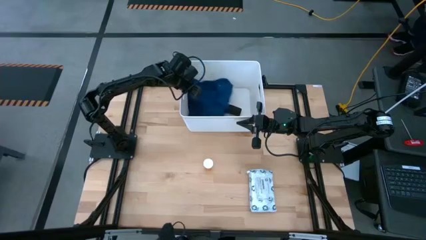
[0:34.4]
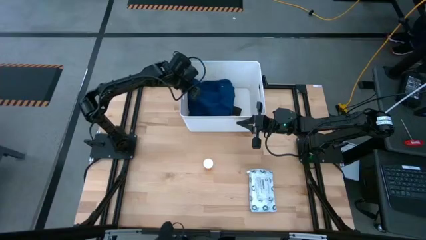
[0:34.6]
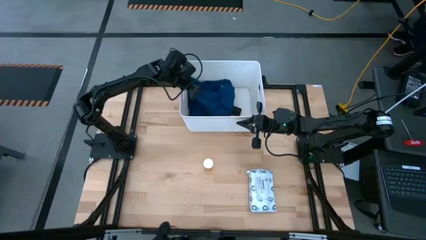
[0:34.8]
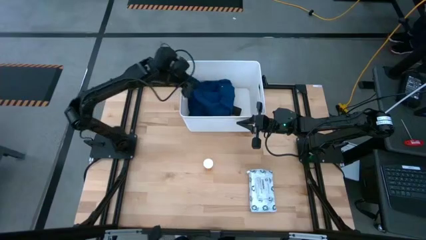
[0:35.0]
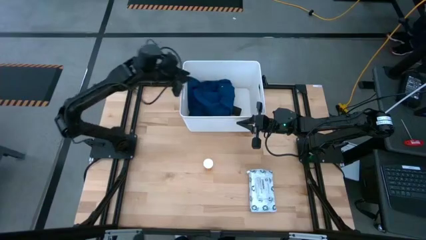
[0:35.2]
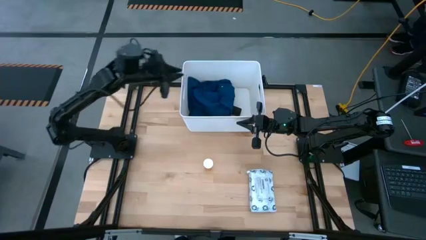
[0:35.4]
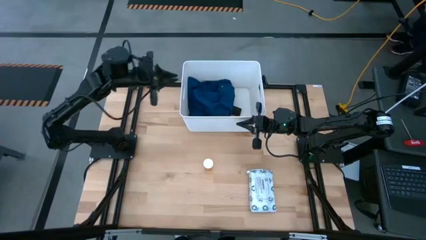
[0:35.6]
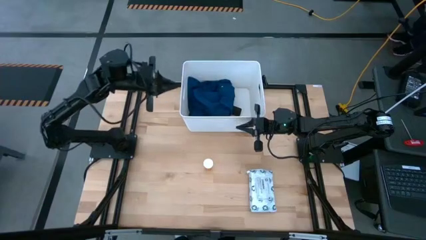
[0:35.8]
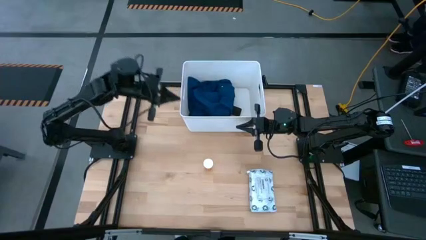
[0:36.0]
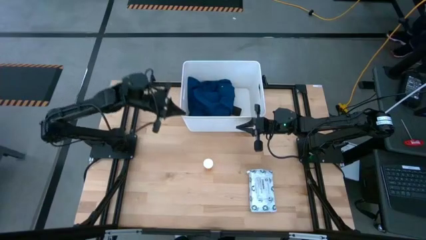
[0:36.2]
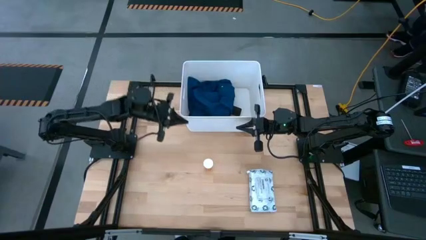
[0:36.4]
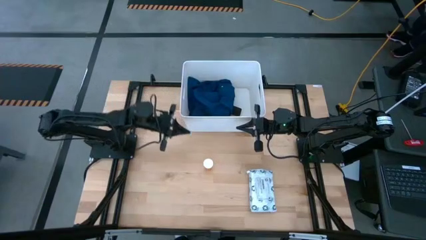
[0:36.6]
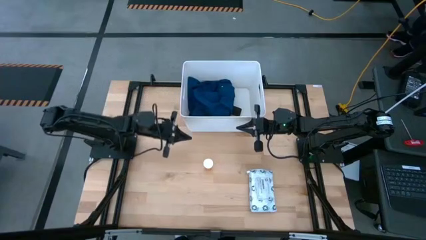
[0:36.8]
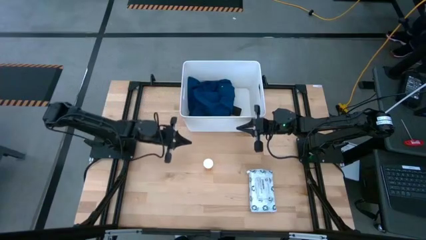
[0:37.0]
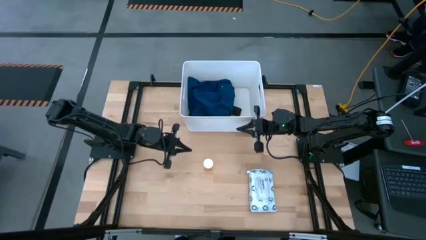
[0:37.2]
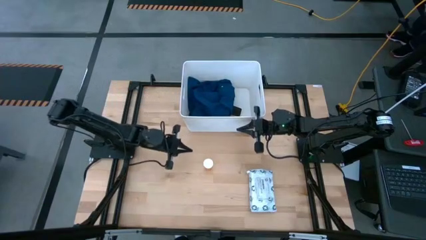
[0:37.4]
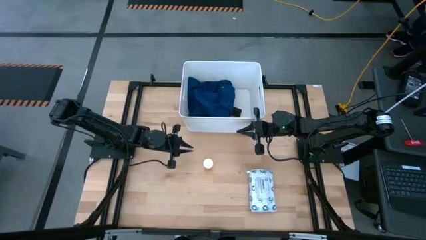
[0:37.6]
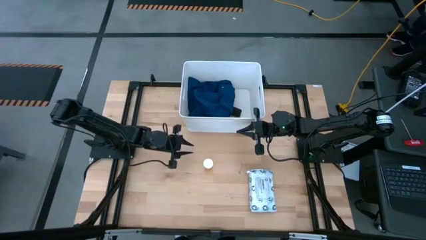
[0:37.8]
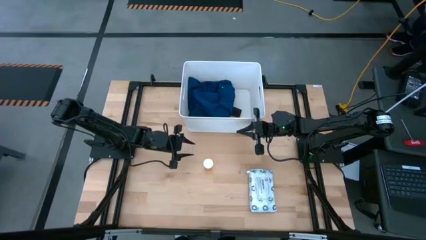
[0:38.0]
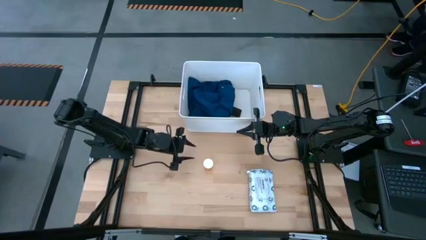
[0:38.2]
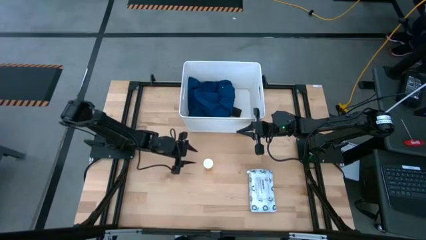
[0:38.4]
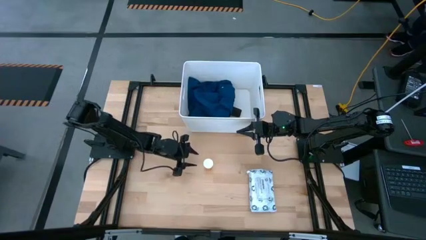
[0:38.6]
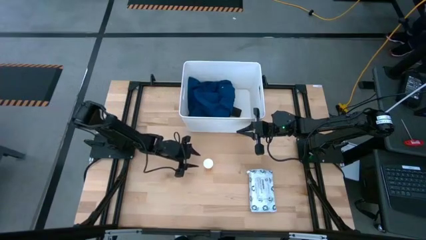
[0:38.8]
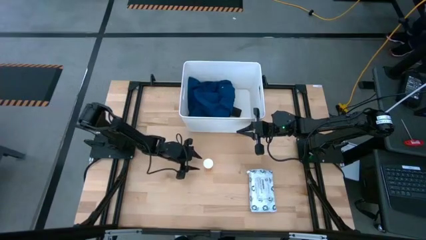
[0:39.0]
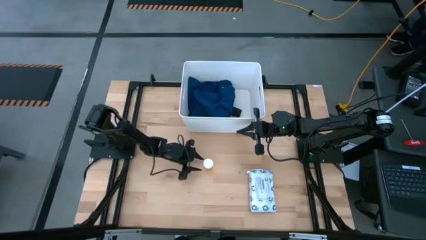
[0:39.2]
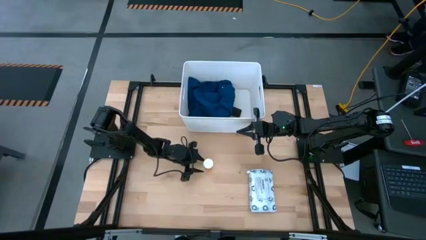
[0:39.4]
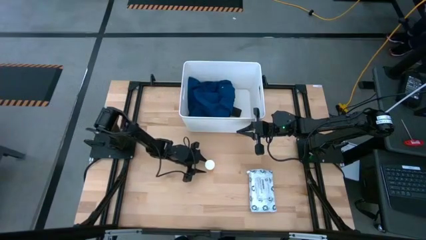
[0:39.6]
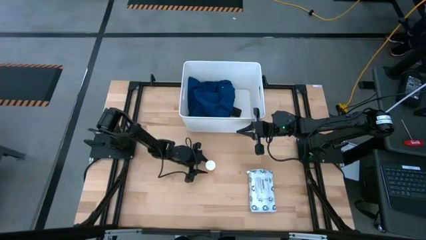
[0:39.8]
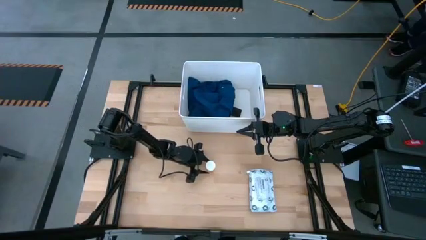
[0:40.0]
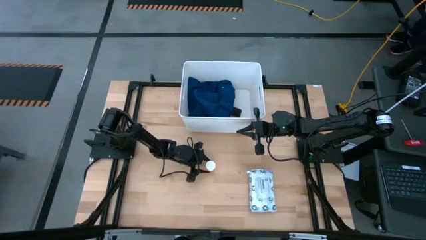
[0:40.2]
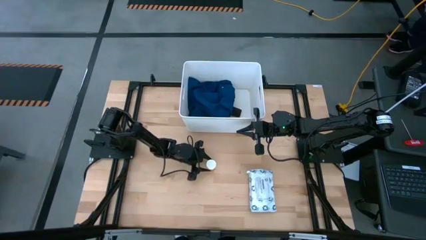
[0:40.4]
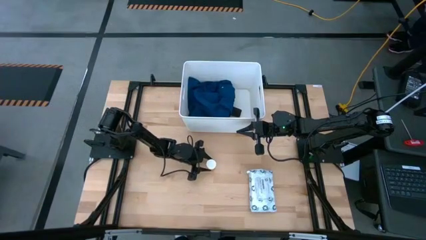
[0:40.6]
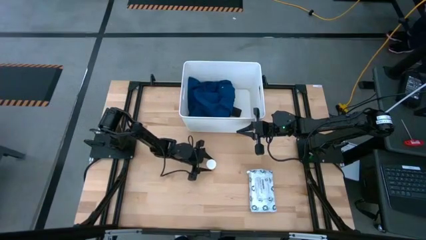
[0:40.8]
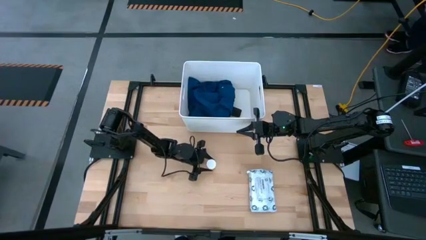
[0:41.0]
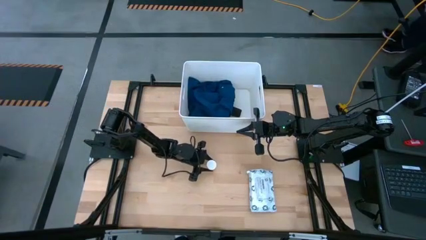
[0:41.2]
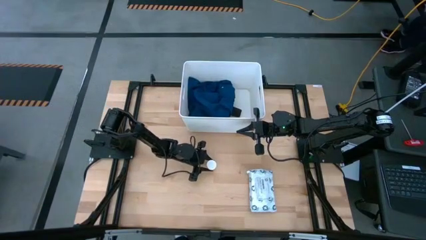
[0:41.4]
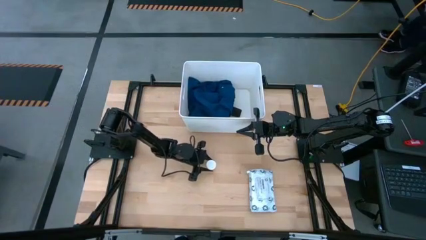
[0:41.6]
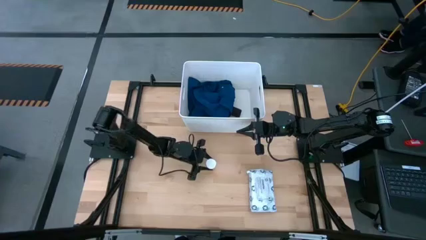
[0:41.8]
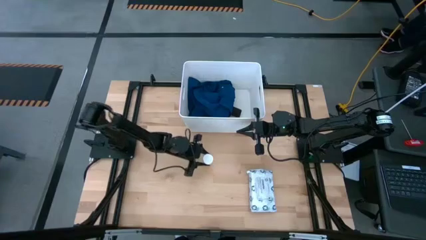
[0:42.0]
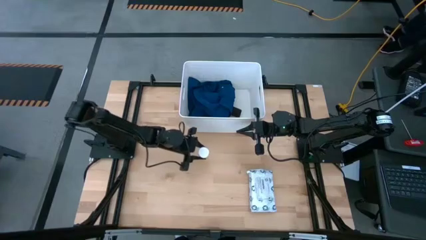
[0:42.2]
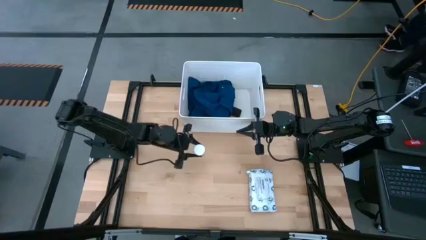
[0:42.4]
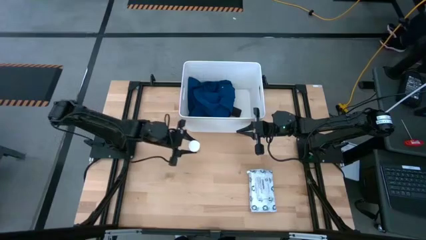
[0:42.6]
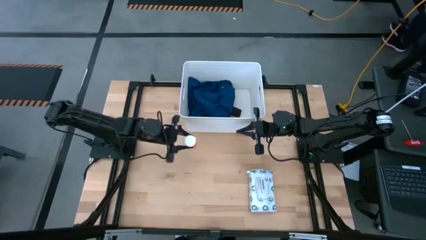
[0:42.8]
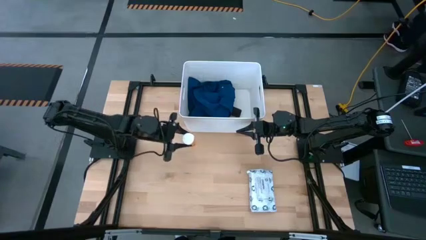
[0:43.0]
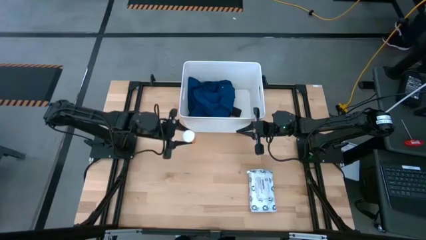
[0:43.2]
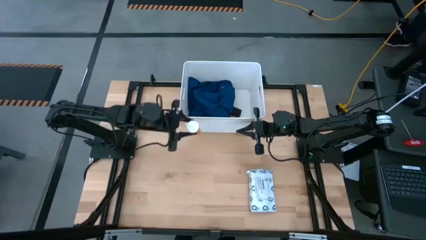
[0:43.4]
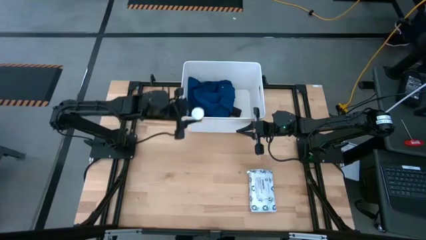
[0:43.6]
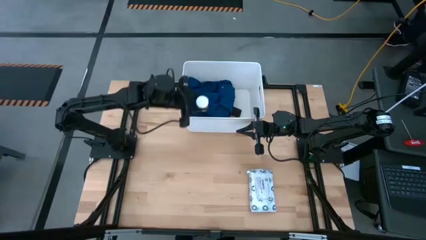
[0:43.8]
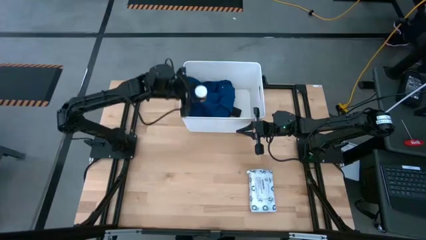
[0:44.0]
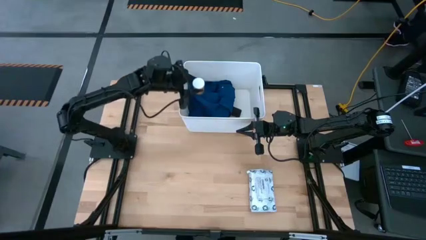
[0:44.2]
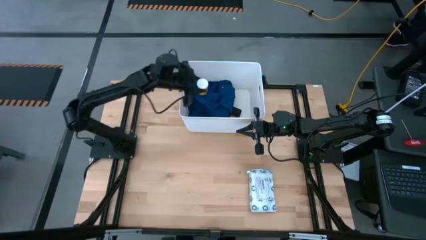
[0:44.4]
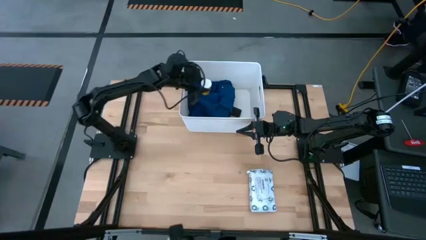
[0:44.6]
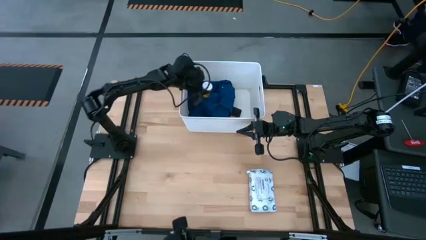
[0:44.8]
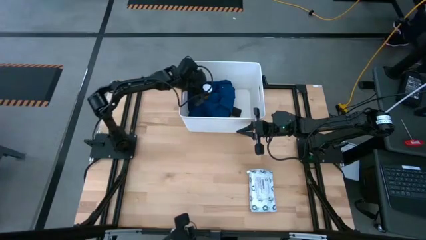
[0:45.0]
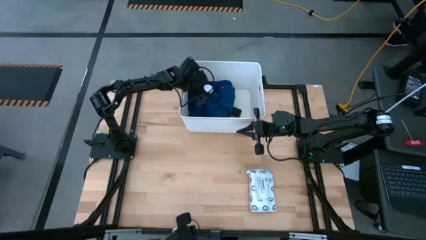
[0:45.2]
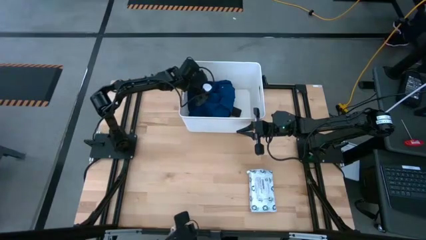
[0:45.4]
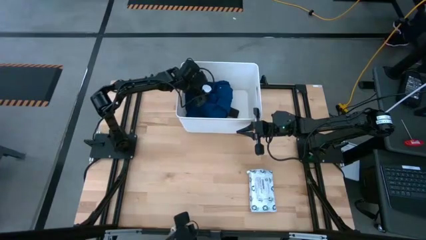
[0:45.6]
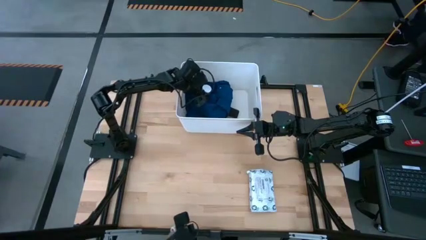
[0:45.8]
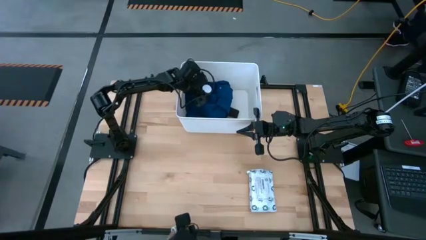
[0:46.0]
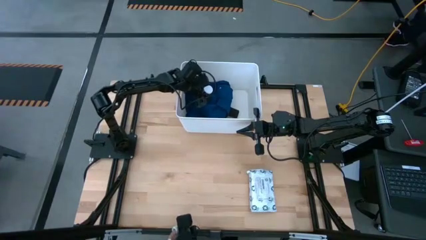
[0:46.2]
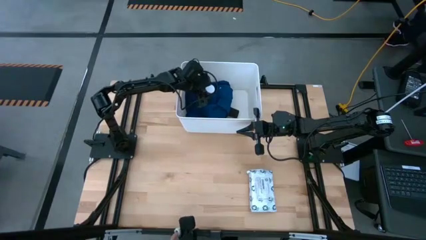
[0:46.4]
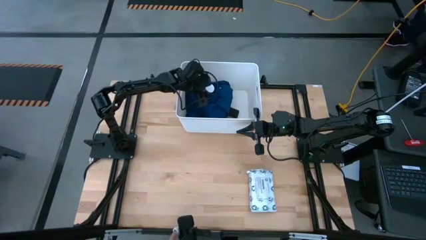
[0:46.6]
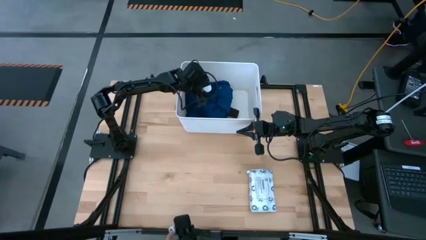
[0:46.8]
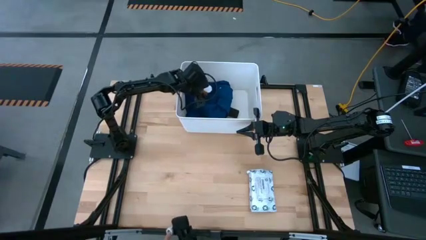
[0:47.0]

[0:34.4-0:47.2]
Task: Pick & place medical supplies in basket/bin
Put the orange bottle into the white bin
